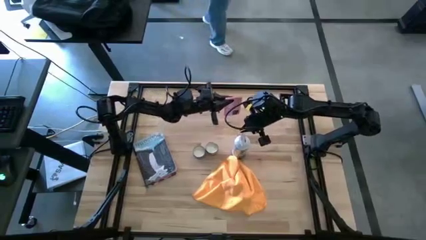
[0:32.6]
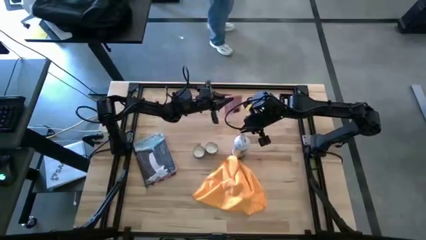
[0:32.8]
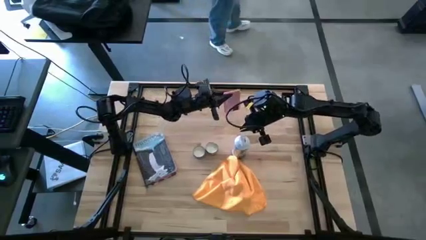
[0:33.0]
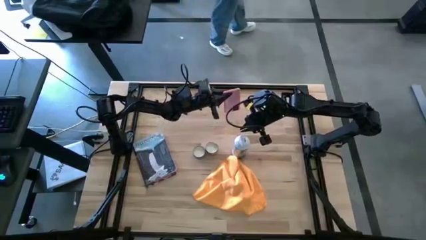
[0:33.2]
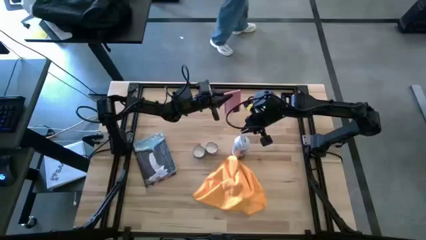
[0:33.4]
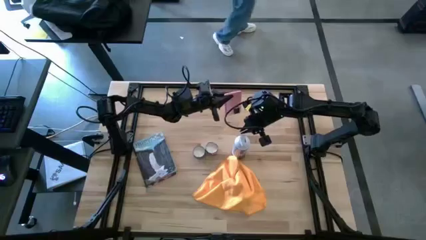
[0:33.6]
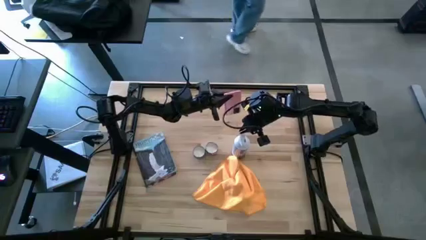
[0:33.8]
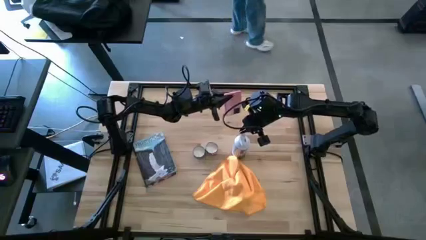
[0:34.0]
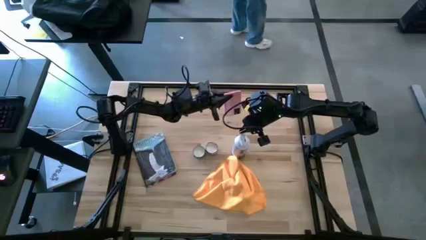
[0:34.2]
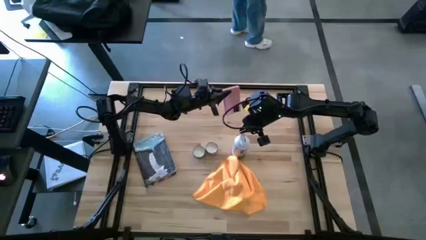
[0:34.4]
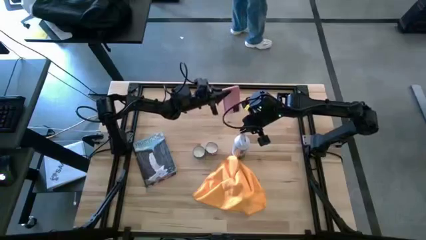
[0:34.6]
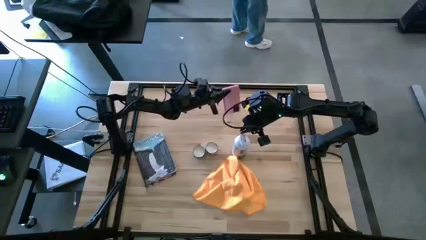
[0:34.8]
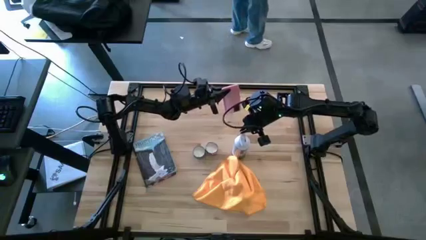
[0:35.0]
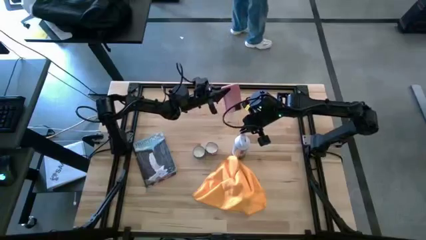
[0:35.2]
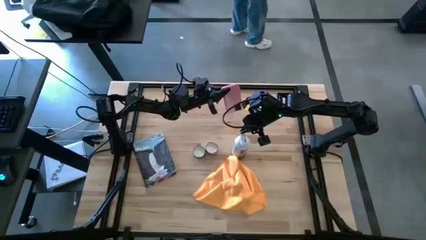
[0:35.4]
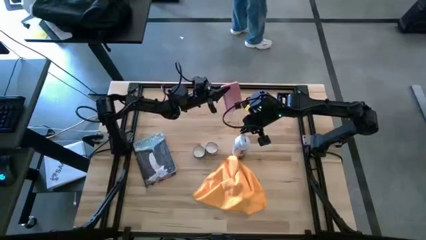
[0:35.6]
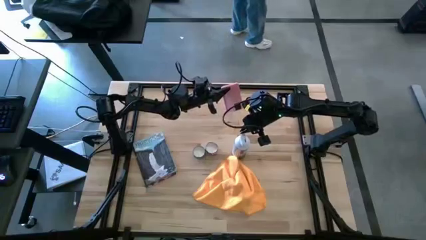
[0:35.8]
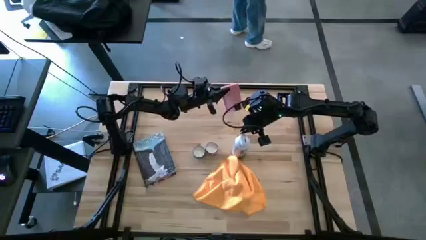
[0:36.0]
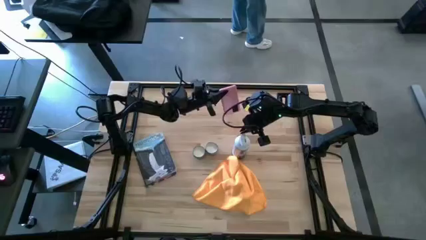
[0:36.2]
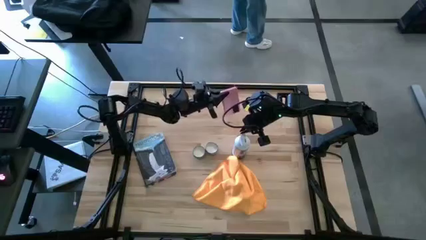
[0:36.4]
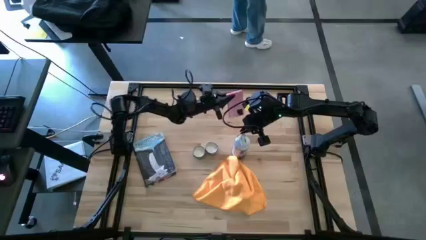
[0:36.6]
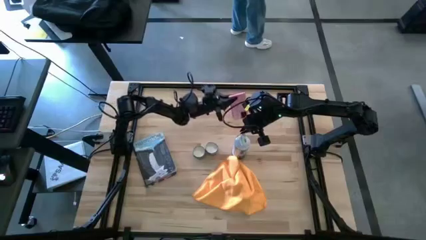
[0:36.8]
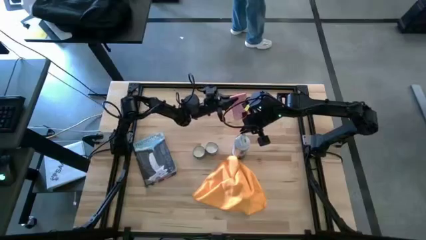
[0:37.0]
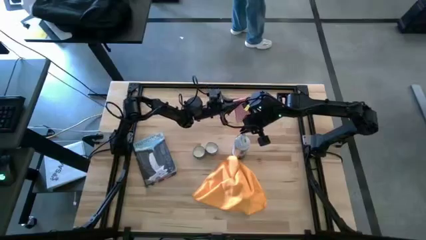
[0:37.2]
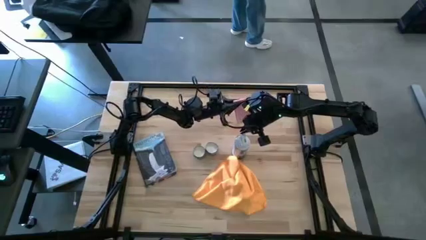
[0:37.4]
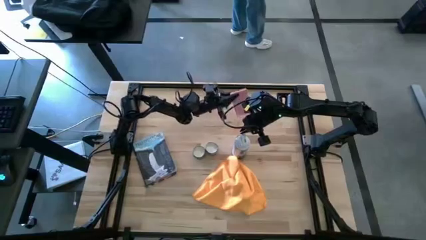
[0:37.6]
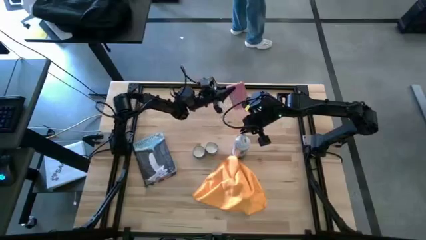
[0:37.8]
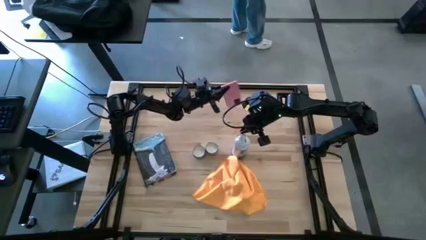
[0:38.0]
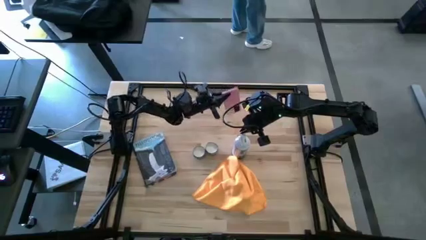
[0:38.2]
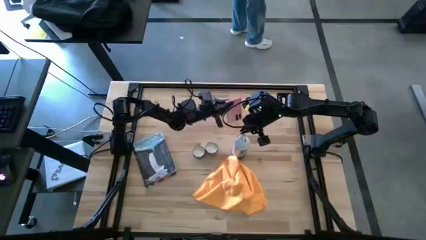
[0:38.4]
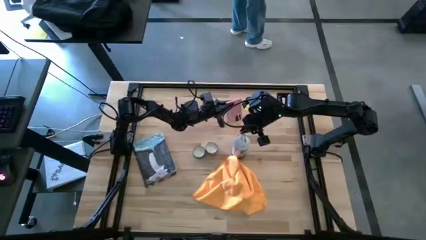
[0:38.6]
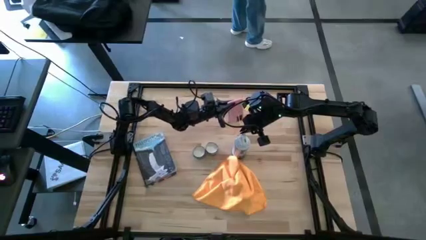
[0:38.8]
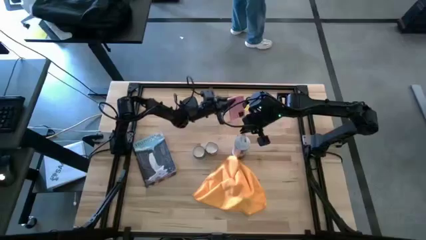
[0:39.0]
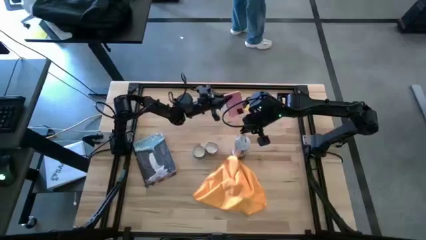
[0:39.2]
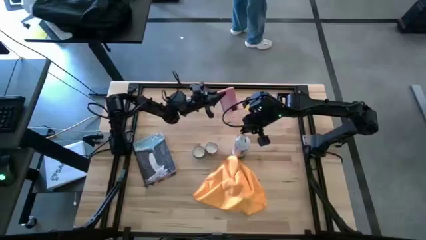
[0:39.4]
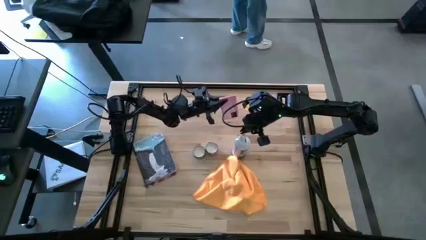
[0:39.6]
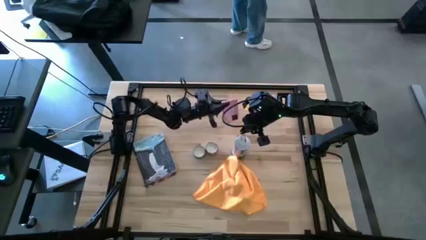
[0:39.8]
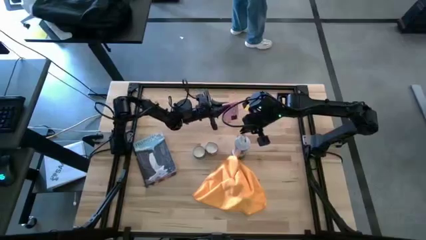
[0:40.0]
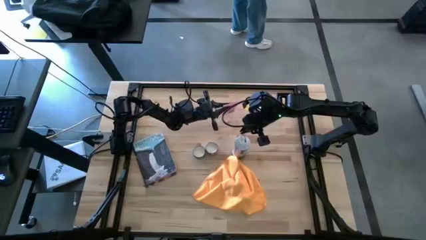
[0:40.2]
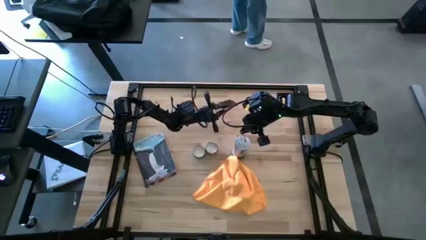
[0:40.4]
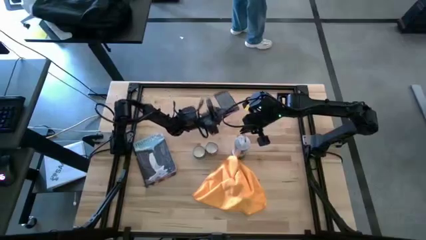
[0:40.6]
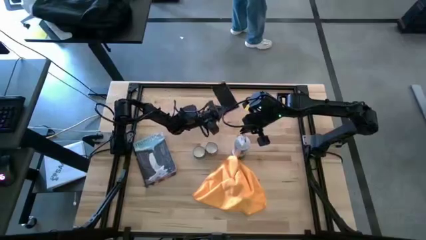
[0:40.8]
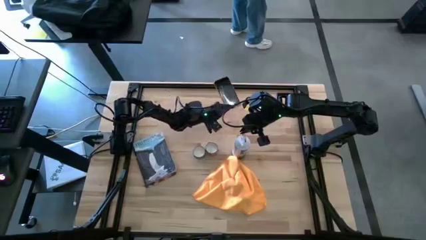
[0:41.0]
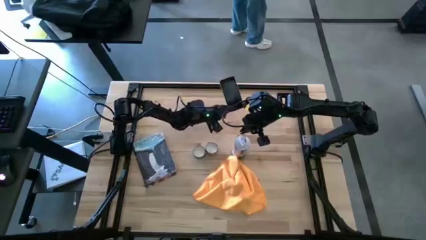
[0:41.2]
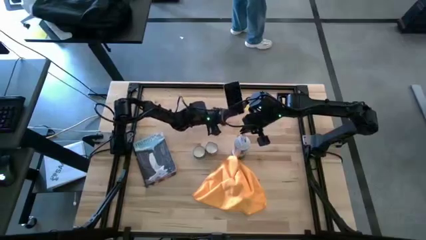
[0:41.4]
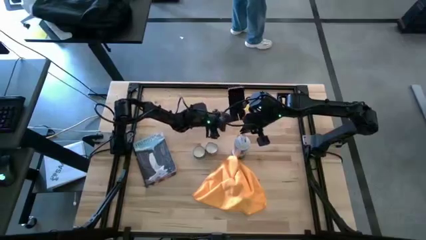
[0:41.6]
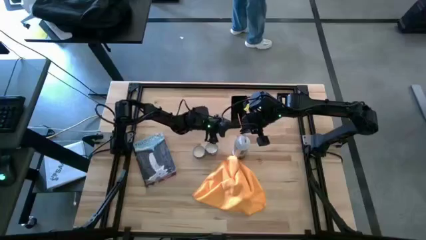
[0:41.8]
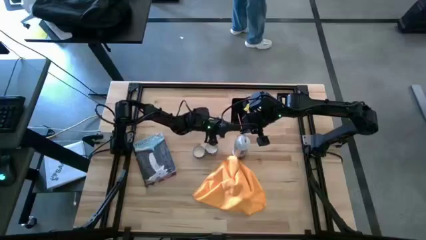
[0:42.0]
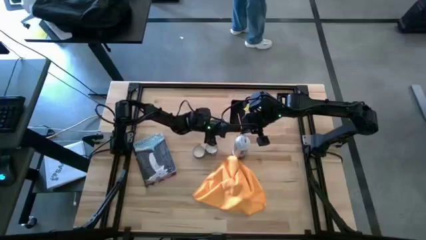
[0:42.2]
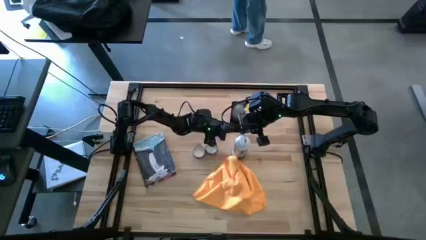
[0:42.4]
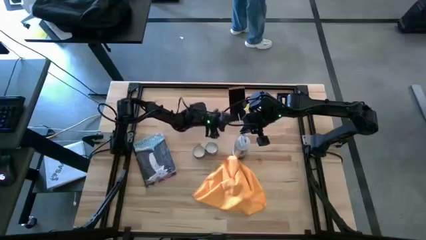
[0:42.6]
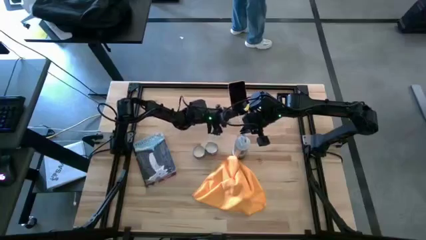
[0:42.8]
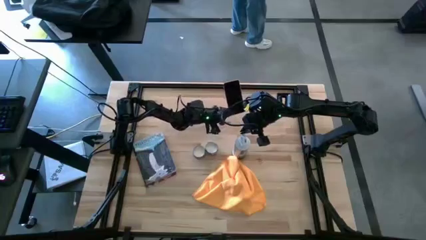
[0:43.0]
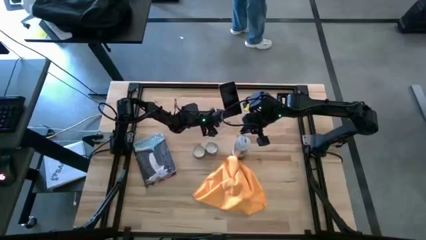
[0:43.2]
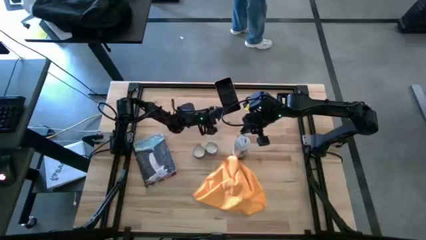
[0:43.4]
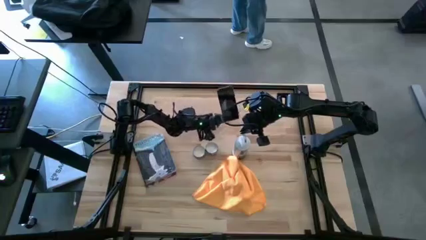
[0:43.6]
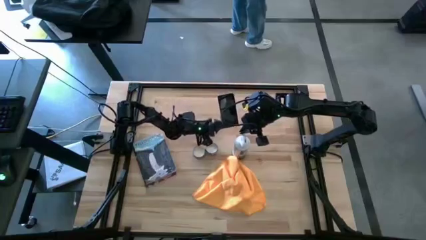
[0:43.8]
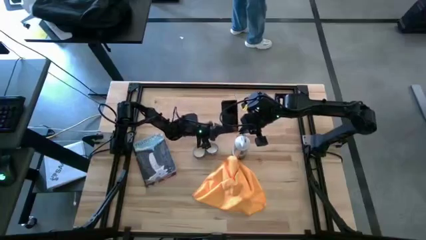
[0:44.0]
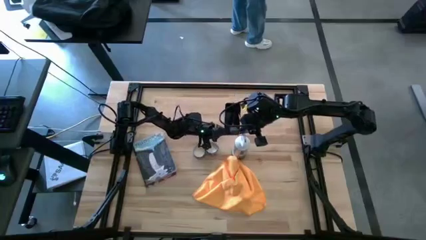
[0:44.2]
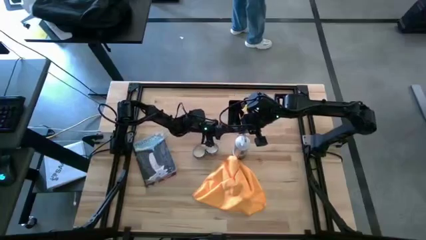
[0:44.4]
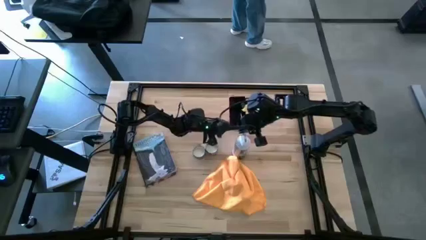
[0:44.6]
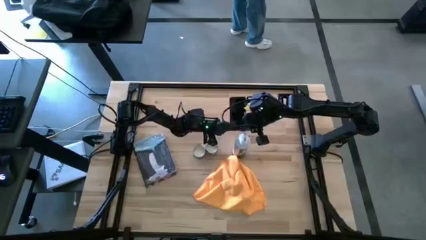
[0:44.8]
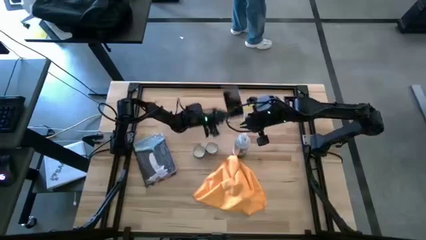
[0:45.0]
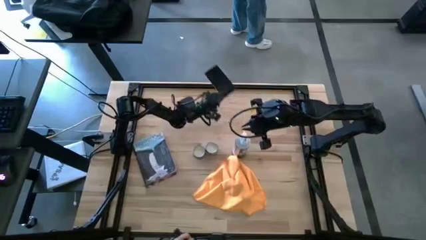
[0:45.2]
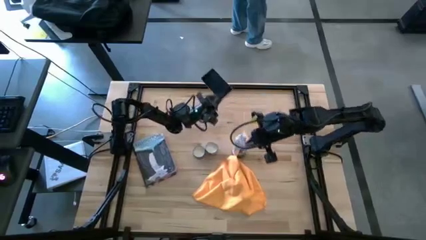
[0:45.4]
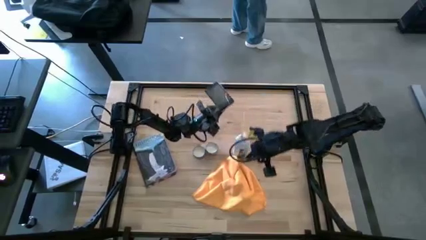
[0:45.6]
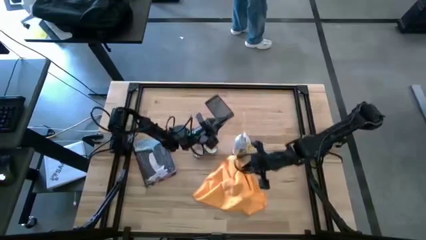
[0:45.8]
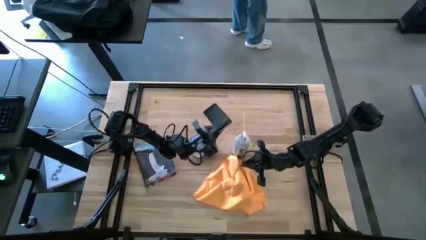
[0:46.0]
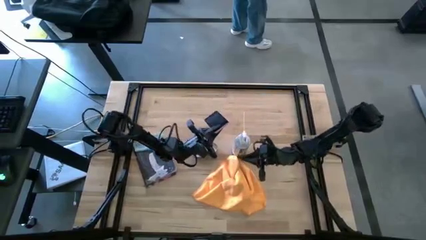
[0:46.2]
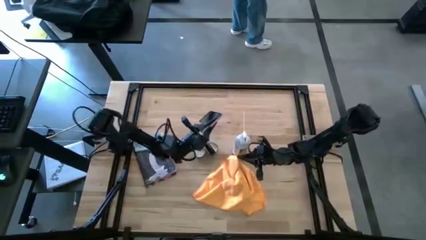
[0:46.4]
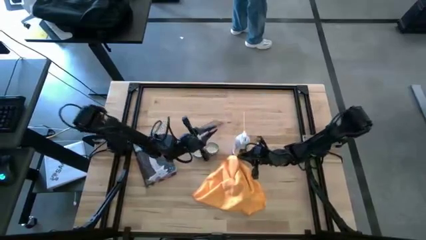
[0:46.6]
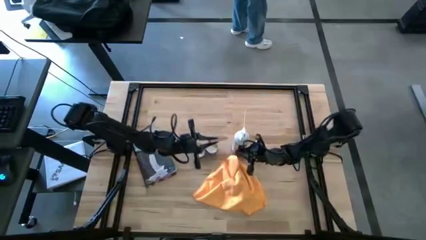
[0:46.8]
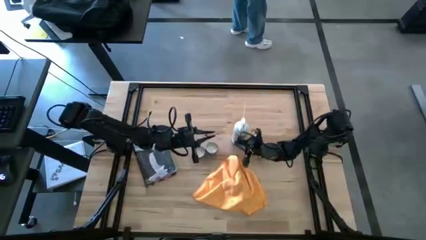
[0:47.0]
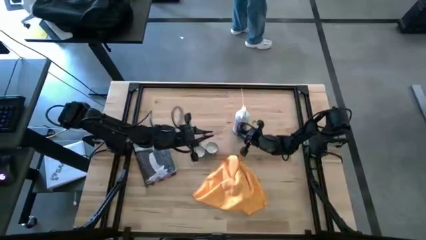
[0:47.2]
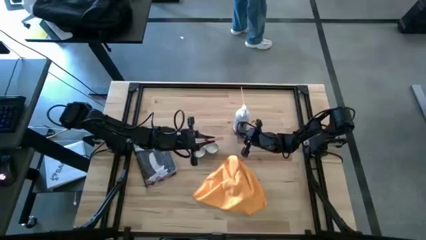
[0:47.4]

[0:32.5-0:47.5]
Task: Apply microfiber cloth
Spray the cellphone
